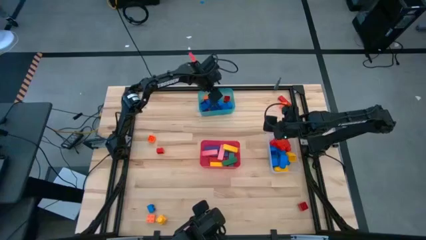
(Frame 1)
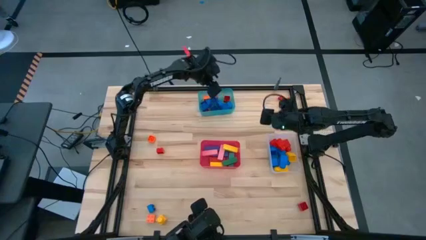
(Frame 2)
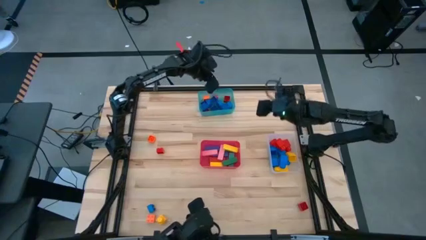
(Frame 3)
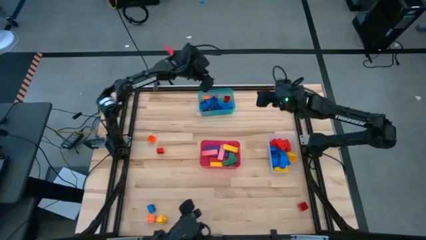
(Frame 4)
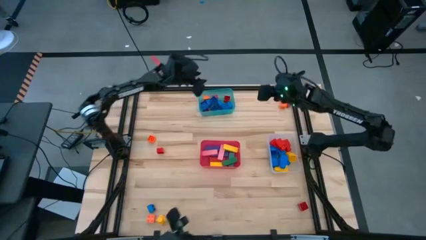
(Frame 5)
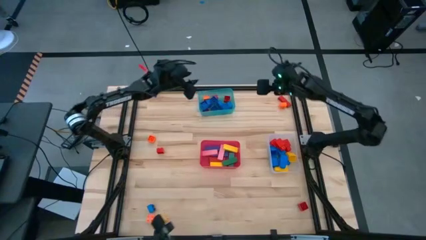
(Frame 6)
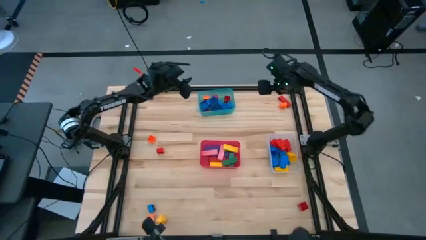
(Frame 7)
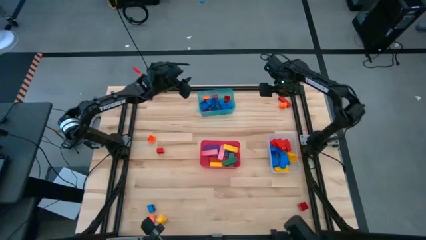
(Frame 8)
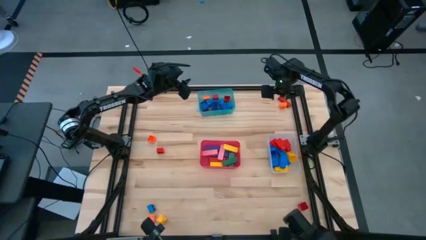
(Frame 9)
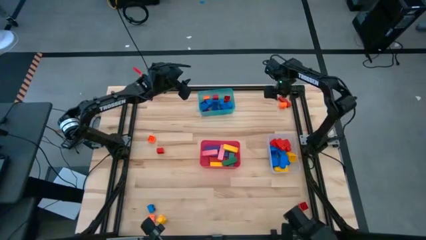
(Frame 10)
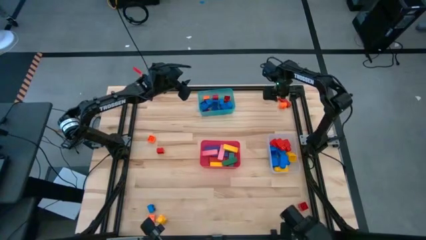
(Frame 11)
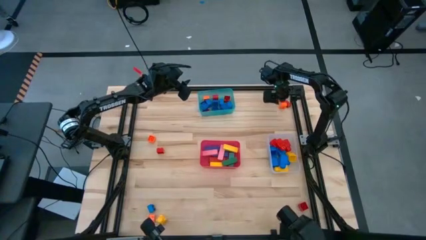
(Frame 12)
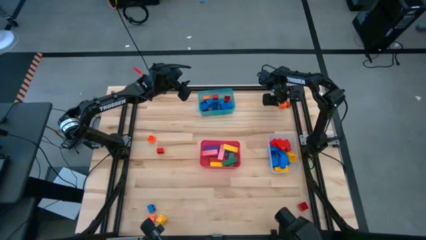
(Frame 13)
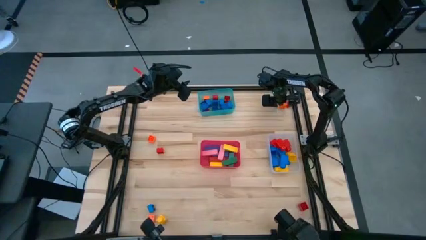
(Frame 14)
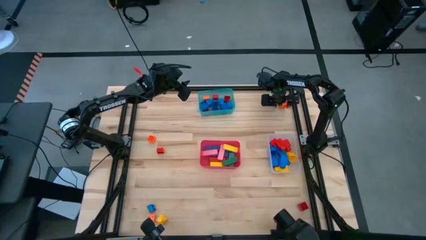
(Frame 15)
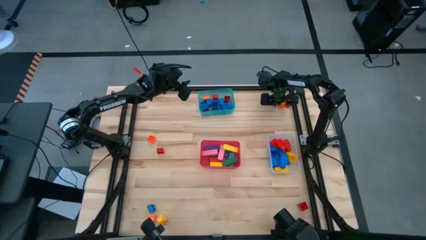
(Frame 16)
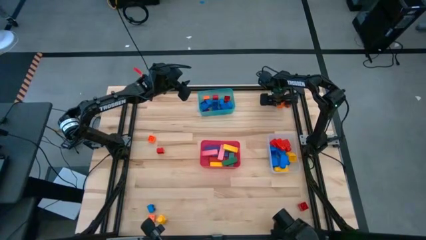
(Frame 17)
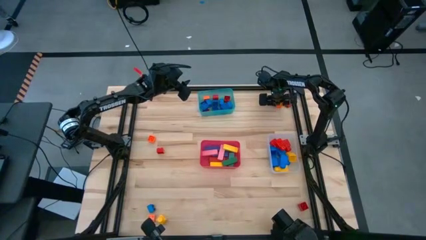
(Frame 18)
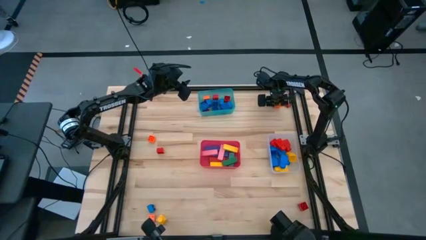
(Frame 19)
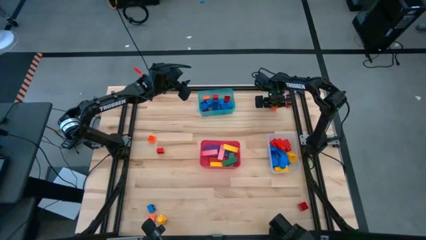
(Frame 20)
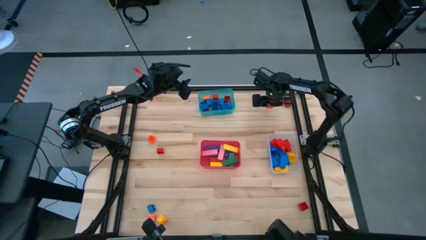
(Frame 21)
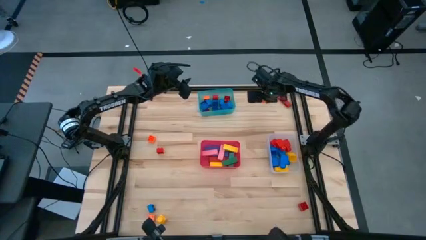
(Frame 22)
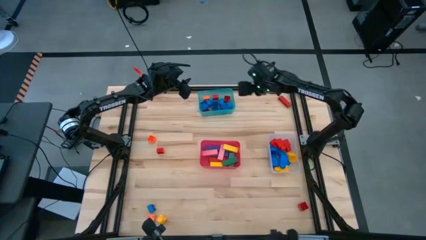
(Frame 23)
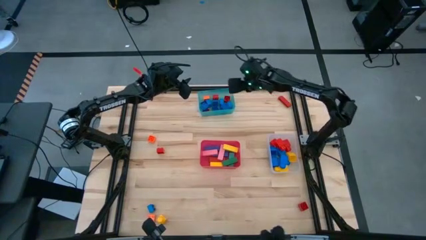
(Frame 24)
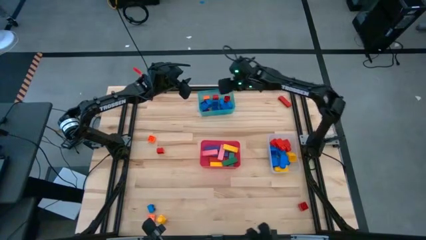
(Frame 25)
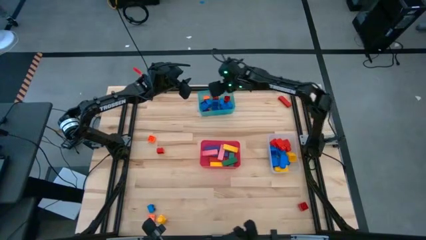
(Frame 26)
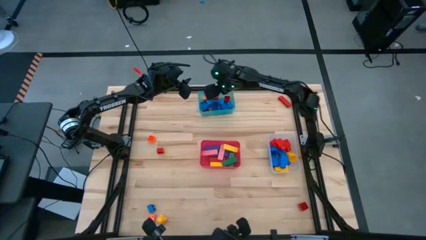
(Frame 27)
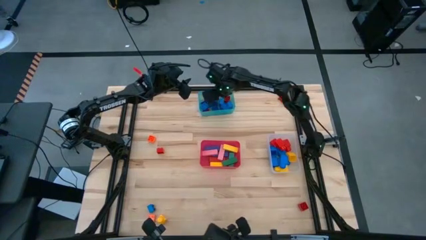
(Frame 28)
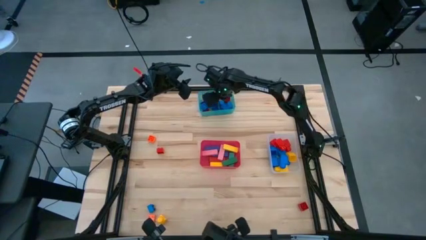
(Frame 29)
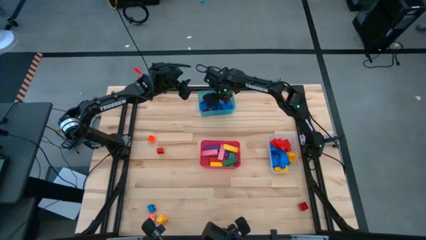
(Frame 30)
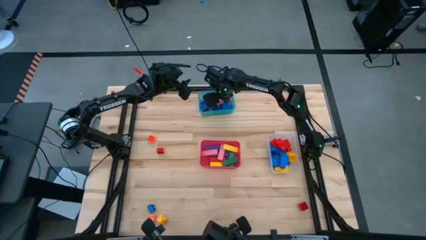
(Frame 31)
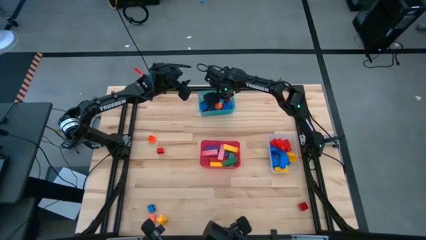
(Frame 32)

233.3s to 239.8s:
Task: Sort blocks by size
Put the orange 4 stud game piece into the transparent bin

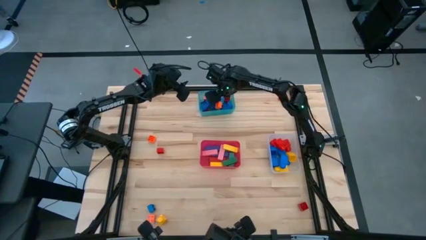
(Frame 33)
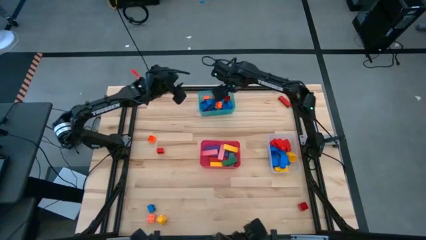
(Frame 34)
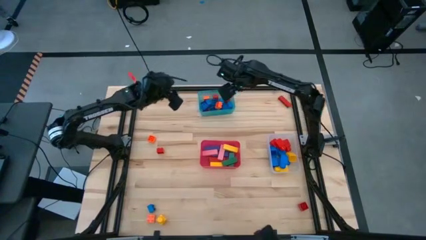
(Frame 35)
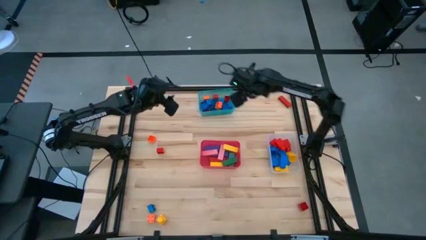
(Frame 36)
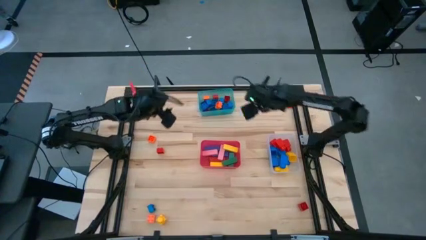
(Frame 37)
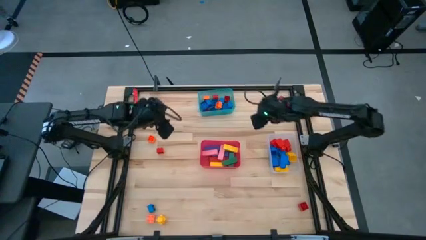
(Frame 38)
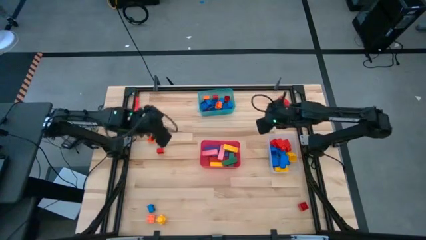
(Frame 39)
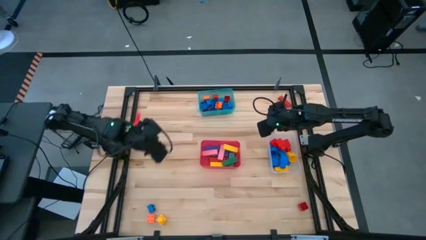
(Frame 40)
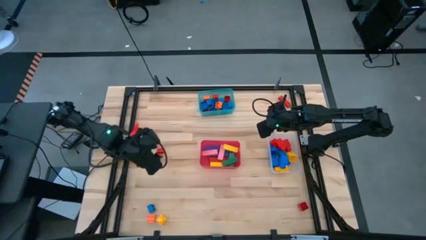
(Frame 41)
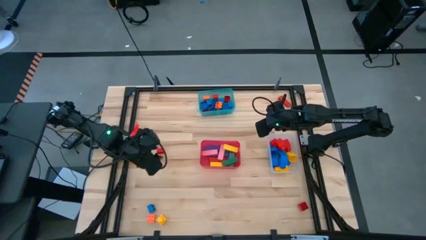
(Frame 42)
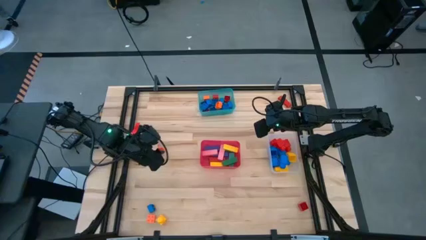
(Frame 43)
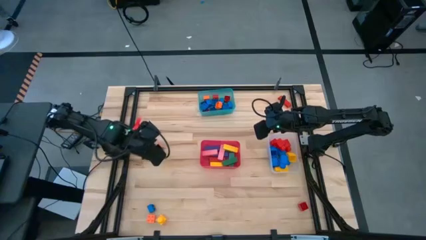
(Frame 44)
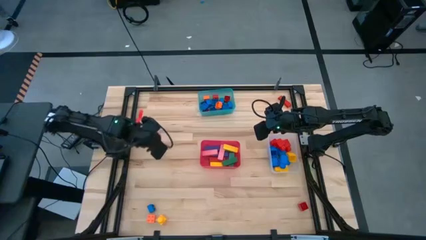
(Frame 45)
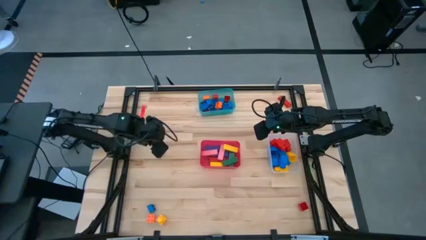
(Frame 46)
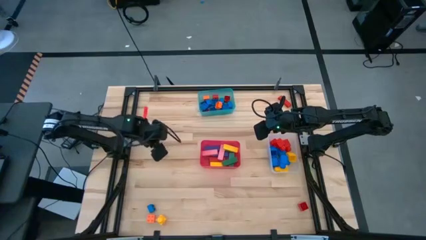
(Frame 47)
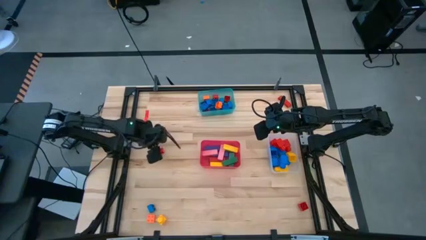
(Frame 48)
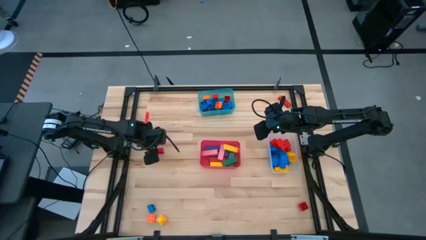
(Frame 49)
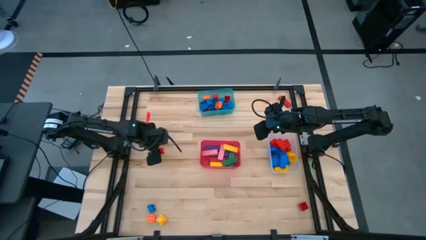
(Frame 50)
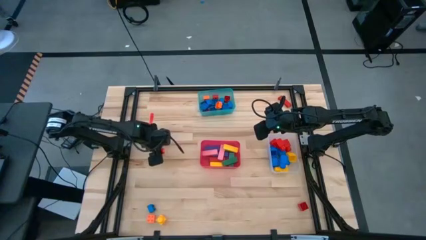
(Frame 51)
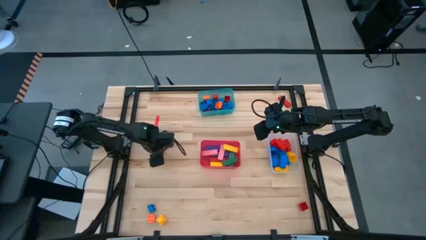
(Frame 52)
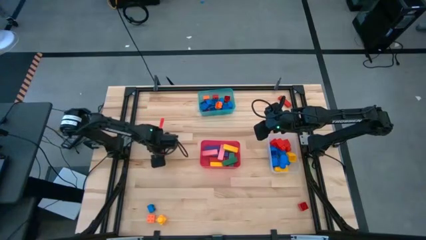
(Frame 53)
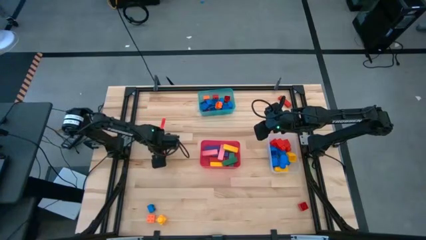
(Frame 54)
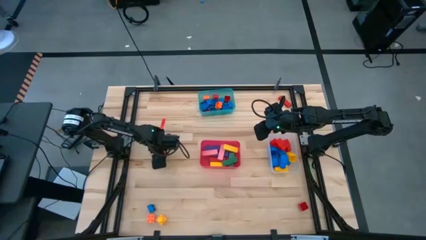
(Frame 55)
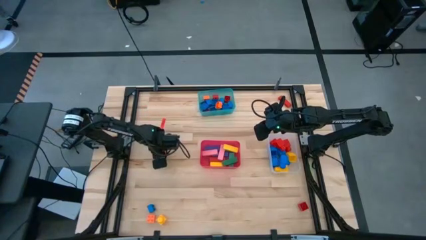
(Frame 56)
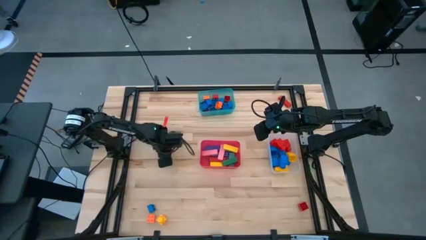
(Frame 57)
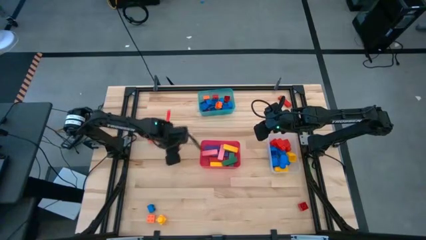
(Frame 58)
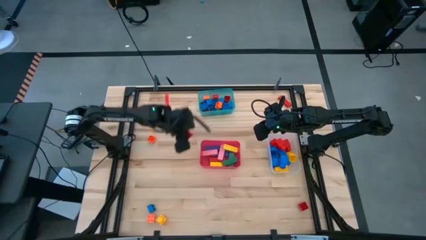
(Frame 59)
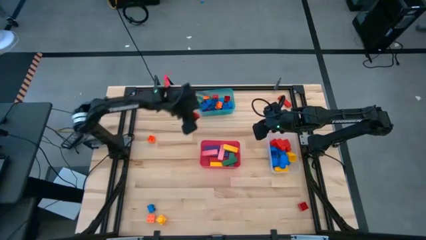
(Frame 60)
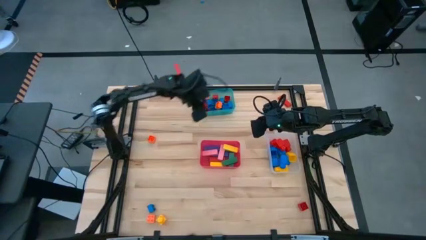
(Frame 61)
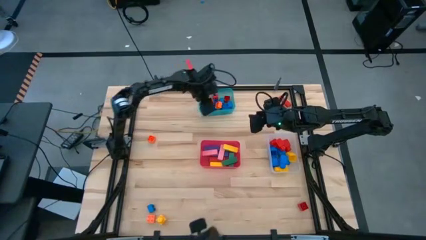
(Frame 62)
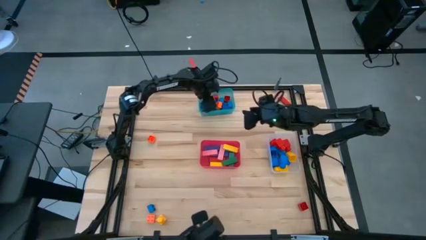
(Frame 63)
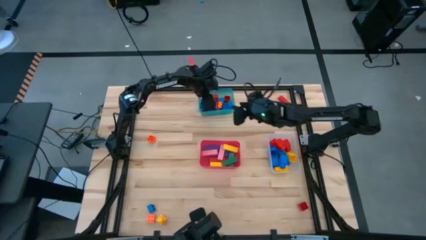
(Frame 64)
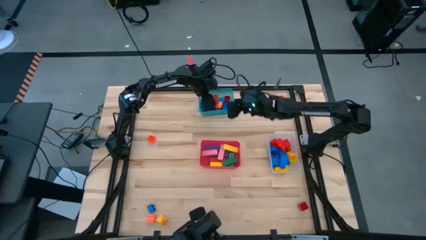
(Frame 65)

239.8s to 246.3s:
Put the orange 4 stud game piece into the blue bin

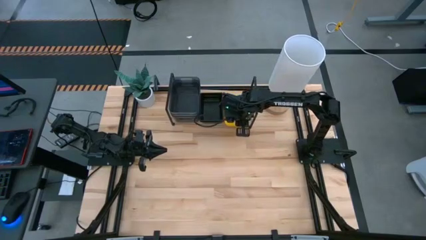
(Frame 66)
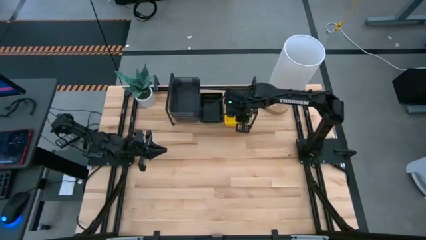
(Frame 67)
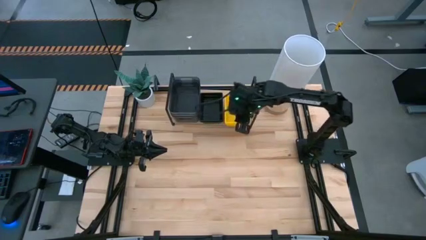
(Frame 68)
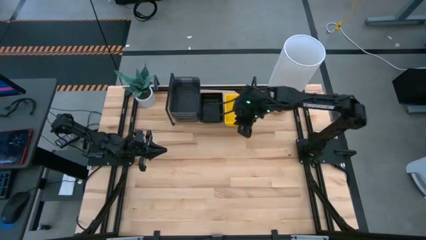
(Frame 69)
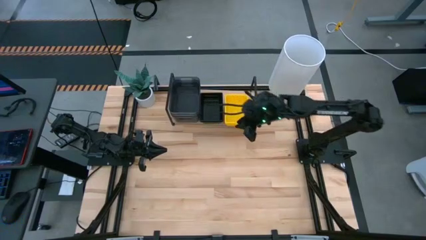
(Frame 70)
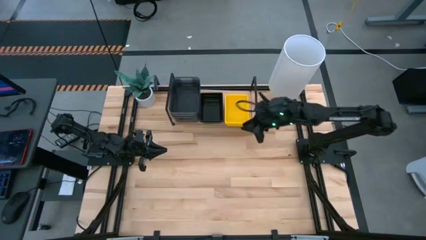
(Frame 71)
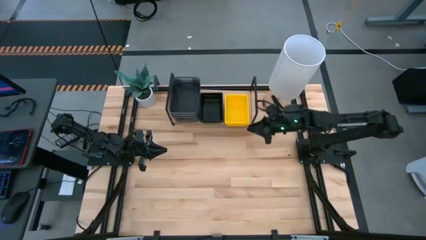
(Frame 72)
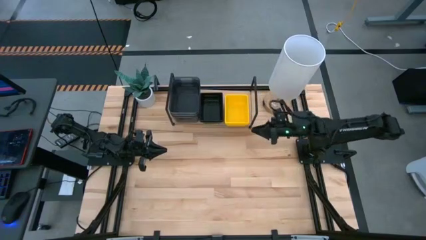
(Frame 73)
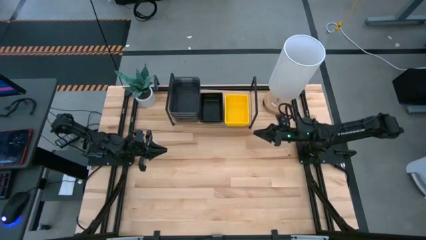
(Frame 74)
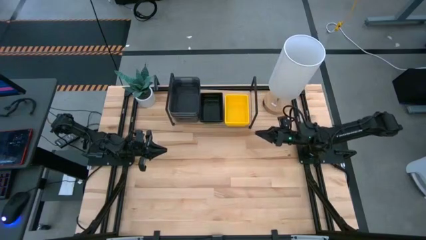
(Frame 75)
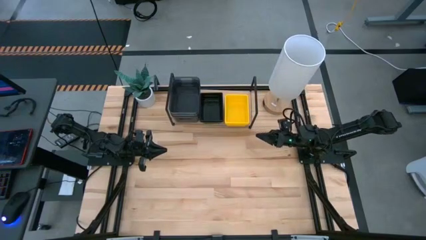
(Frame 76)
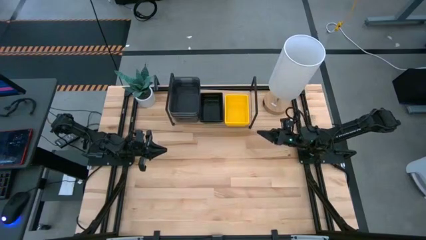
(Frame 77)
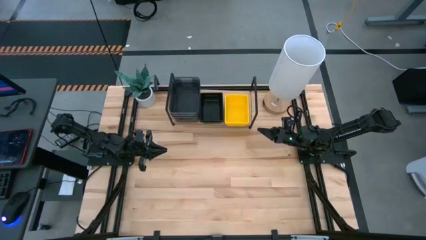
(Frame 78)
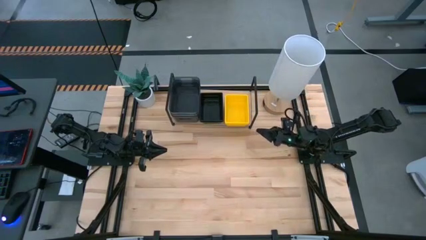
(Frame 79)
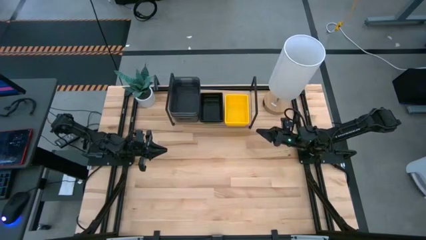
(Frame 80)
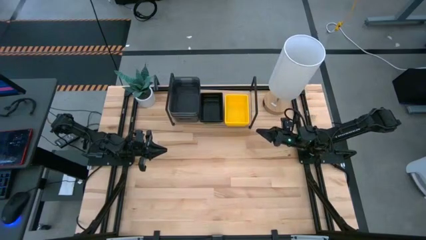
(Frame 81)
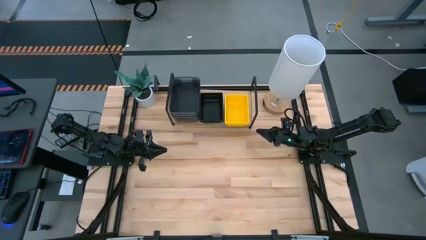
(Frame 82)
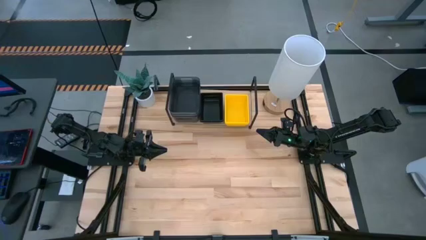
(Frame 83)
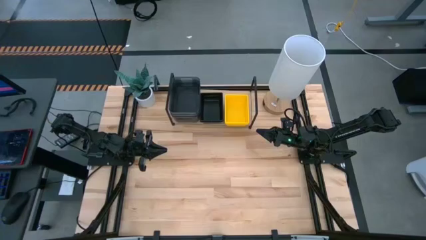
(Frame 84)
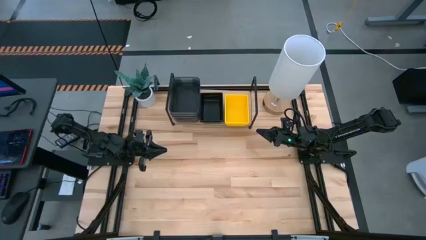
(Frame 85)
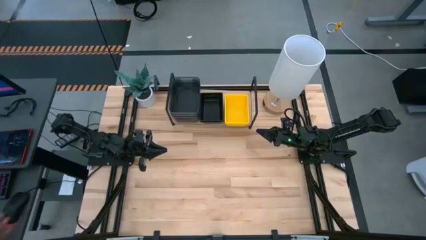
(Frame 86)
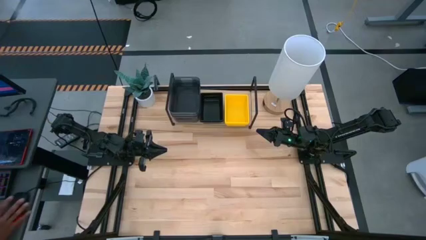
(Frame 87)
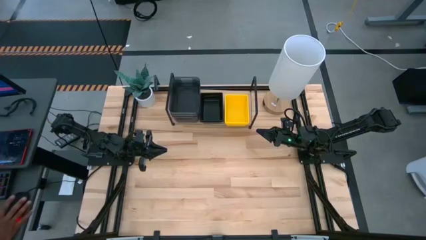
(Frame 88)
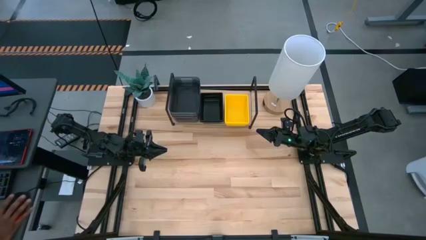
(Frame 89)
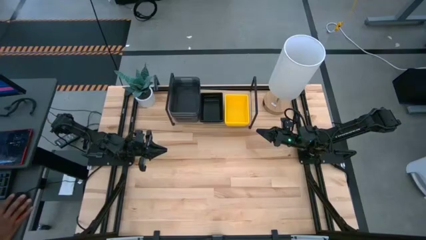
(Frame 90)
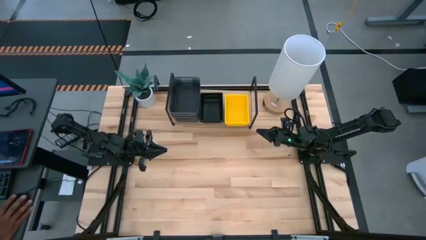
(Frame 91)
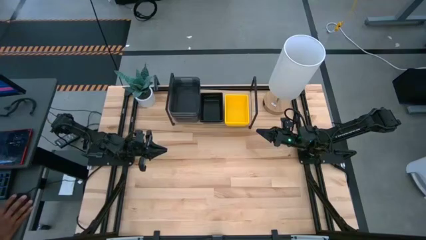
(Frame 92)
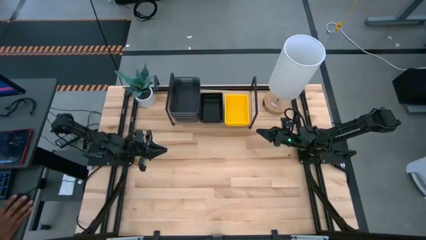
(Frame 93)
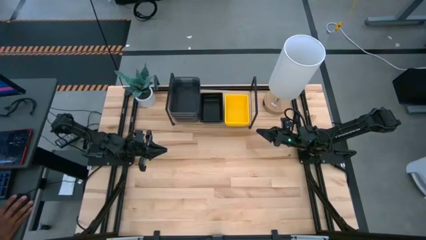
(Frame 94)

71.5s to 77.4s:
Task: Stack baskets on shelf by color
Return to Home Position
